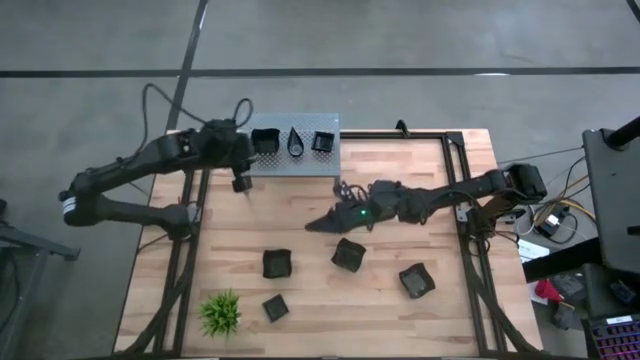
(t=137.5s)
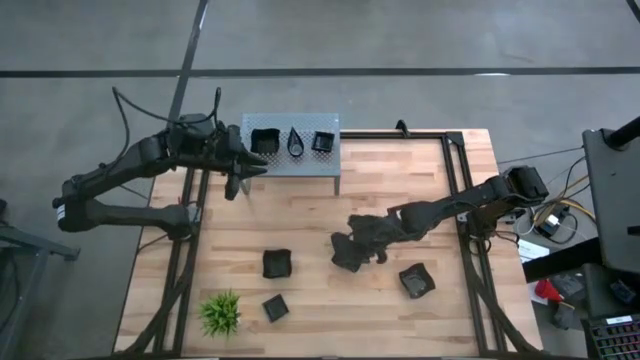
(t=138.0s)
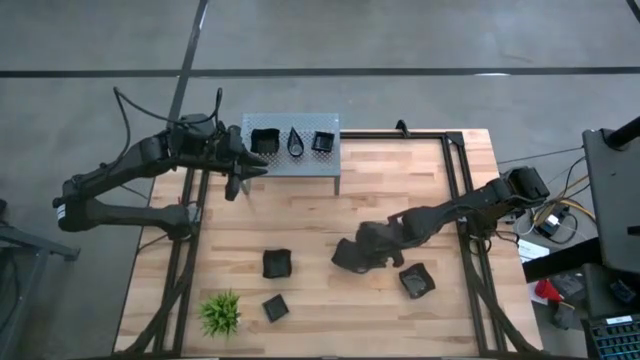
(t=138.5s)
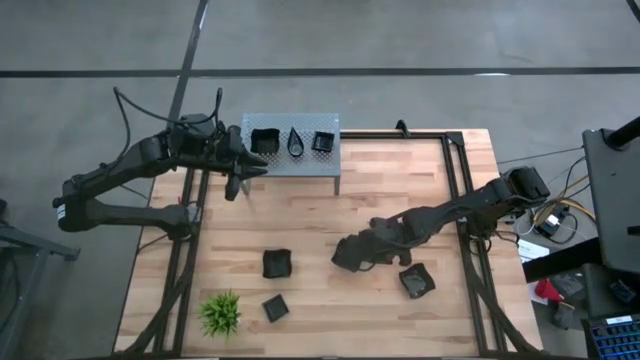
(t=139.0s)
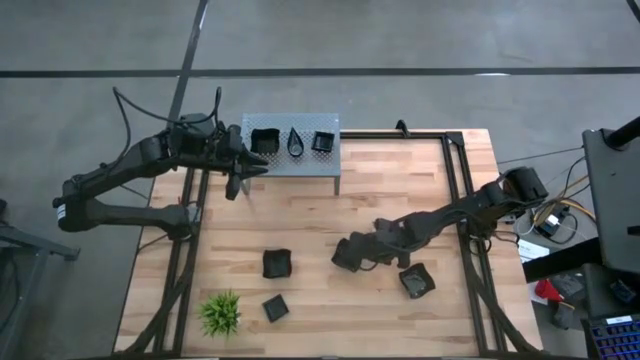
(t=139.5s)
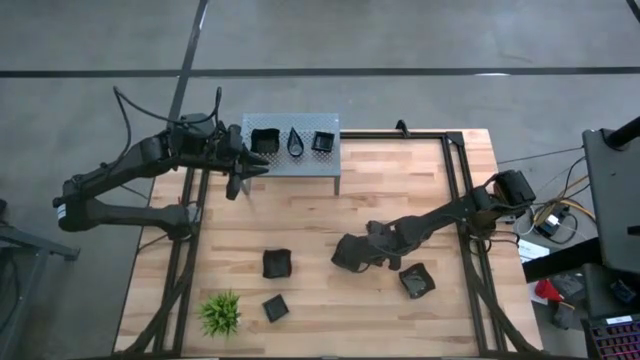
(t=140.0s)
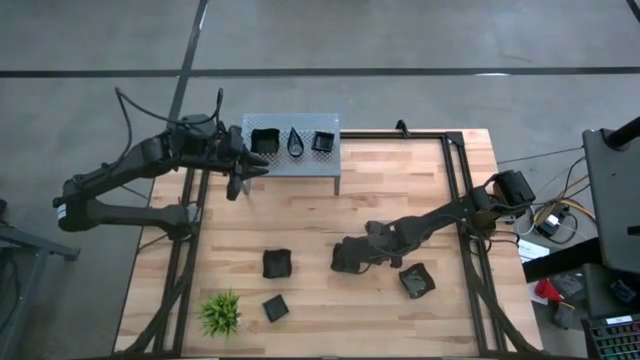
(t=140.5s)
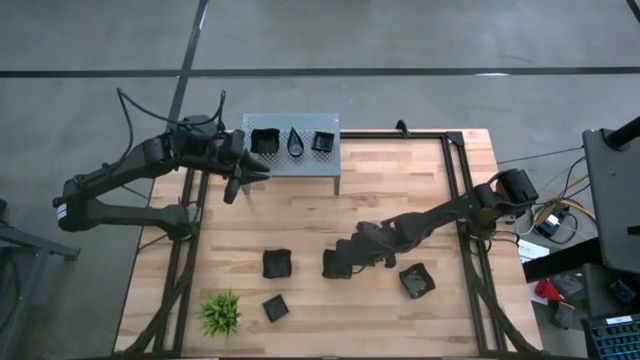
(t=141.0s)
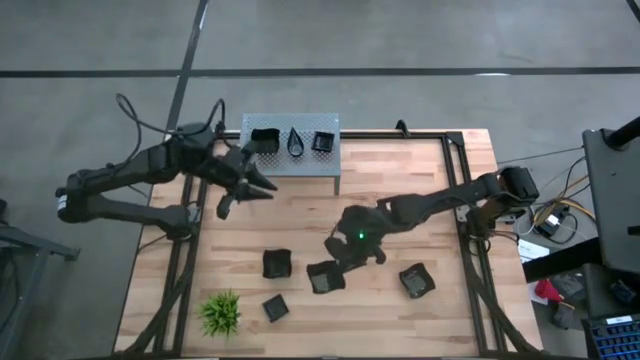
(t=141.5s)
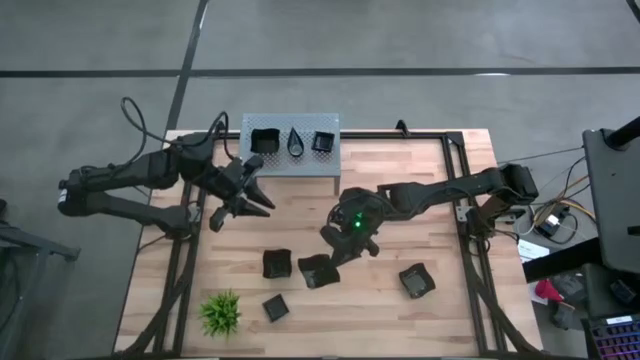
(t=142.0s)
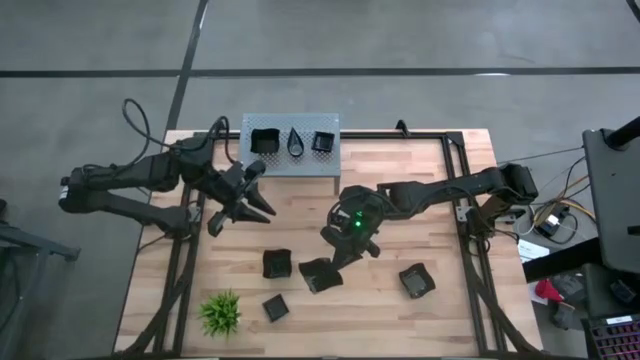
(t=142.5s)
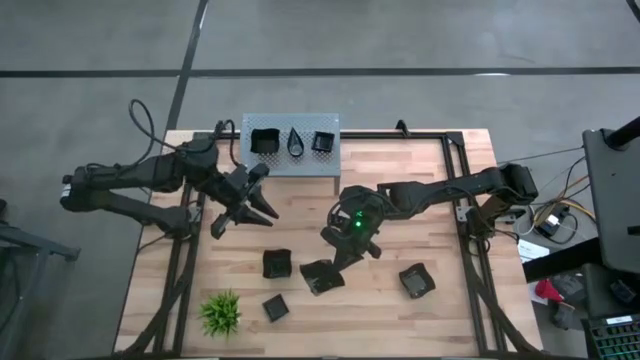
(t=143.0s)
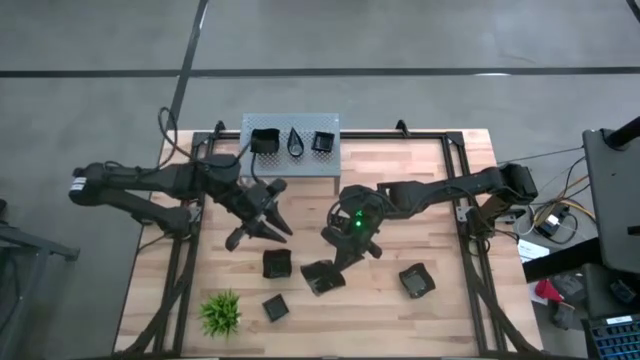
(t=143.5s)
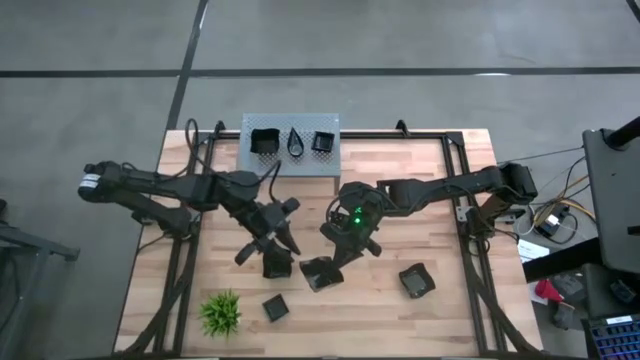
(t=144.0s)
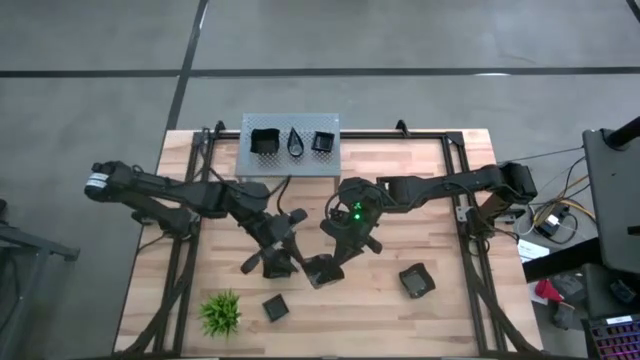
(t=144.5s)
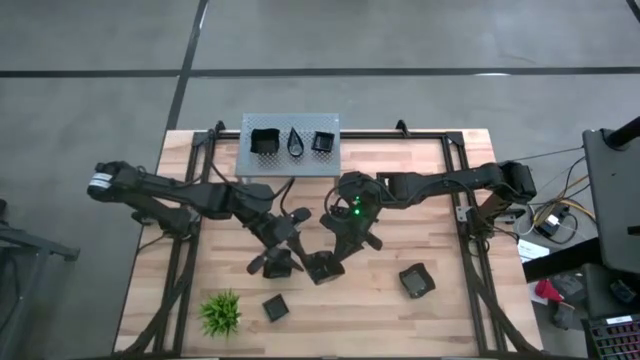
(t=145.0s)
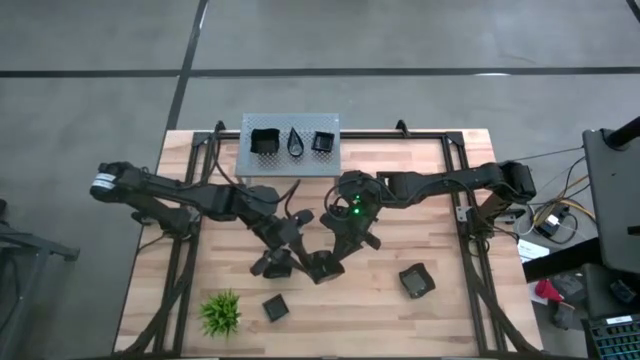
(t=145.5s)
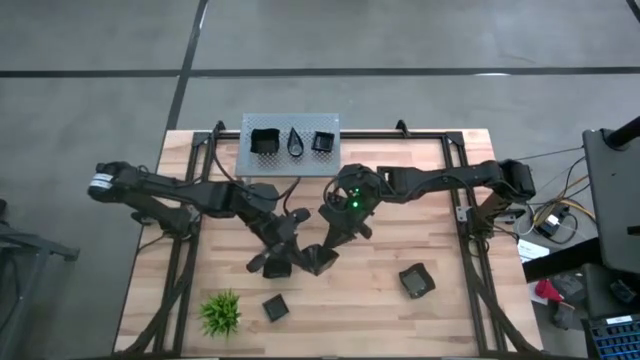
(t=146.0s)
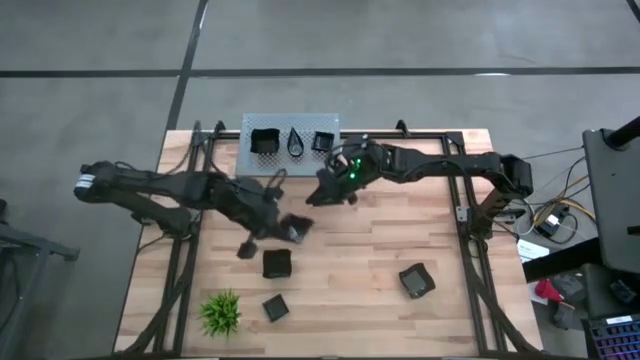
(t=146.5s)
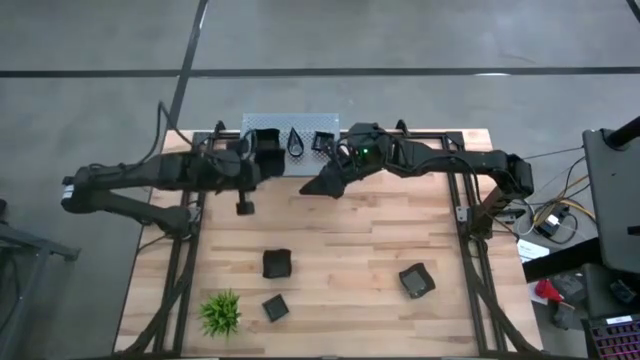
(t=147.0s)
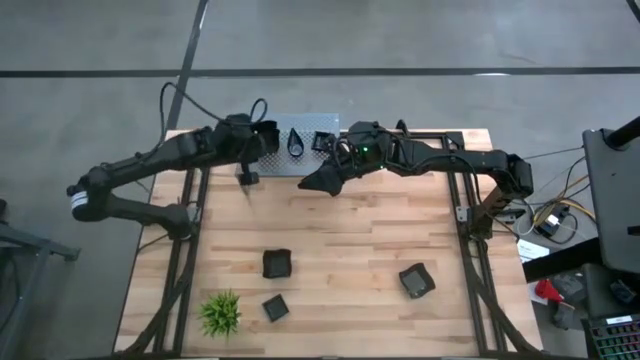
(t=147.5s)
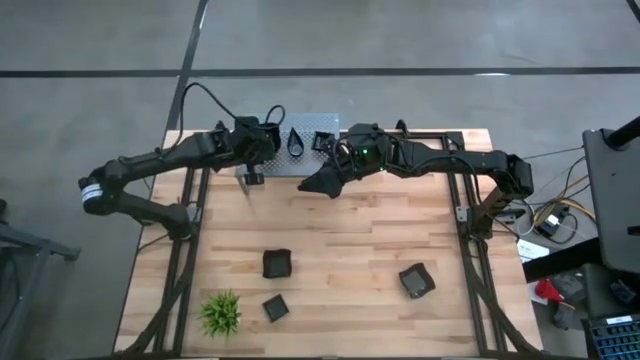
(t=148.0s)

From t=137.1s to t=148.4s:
Task: Pick & Place Mini shaped plates
Stack the middle right distorted square plate on top of the other square plate on the shelf

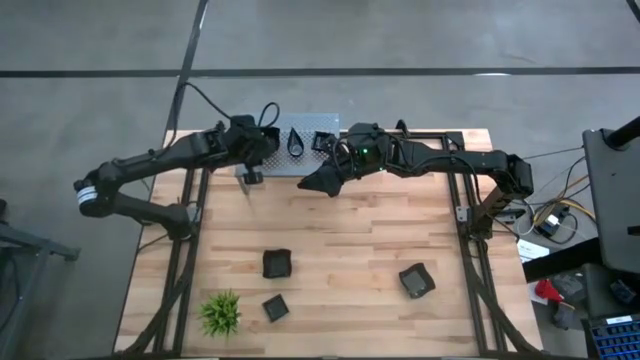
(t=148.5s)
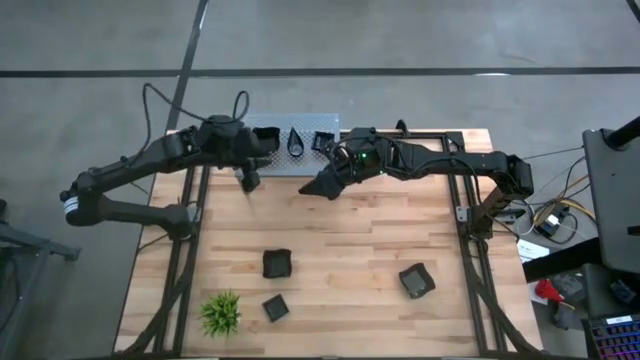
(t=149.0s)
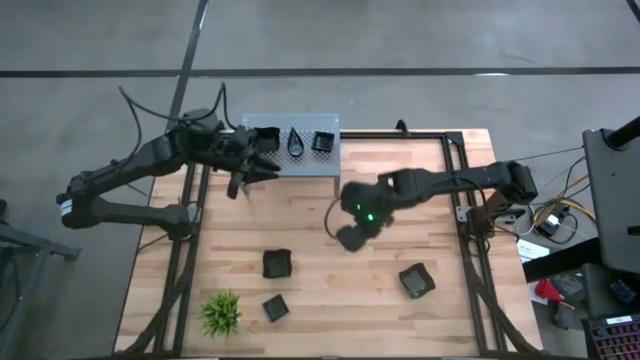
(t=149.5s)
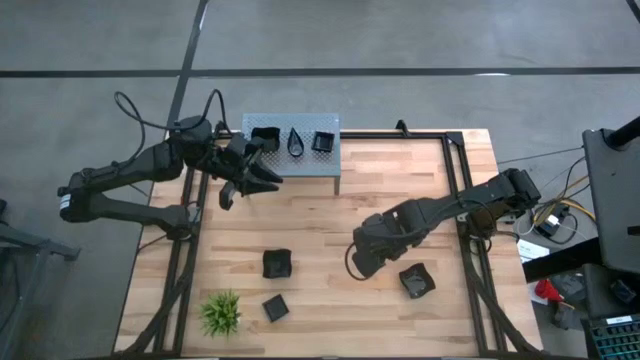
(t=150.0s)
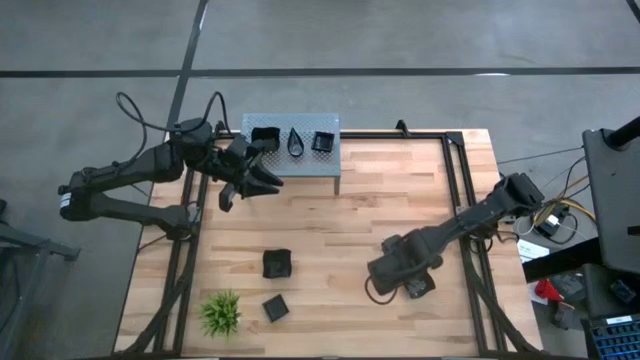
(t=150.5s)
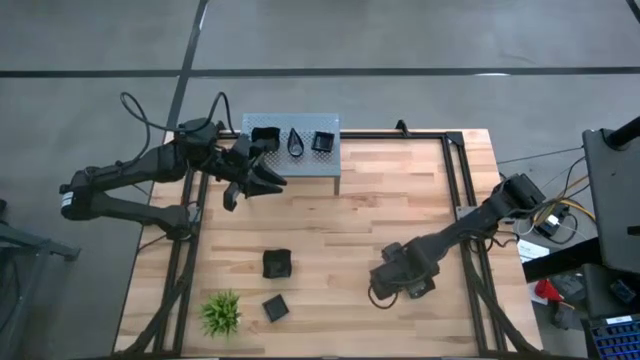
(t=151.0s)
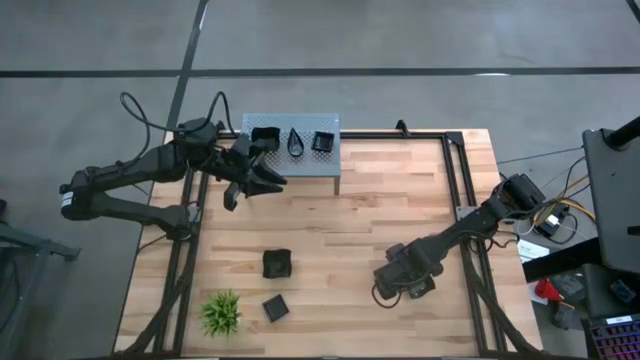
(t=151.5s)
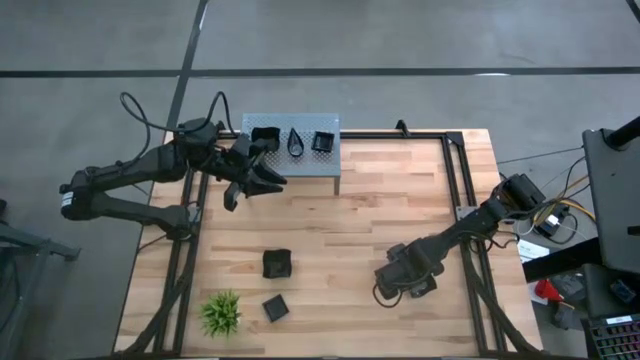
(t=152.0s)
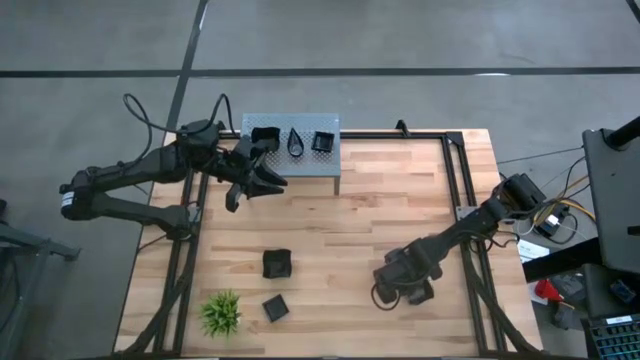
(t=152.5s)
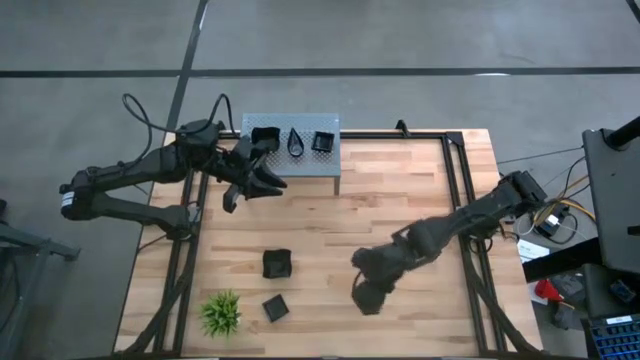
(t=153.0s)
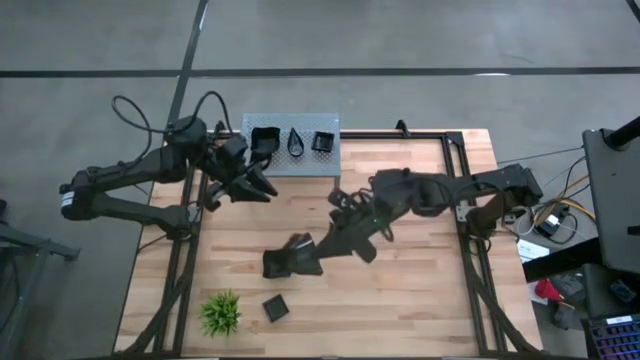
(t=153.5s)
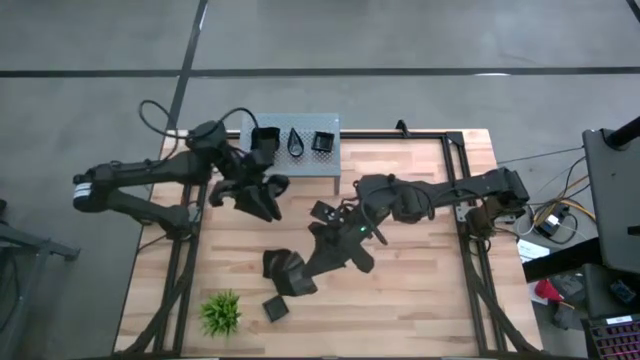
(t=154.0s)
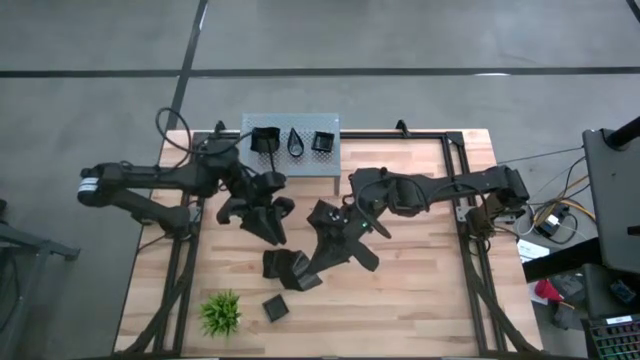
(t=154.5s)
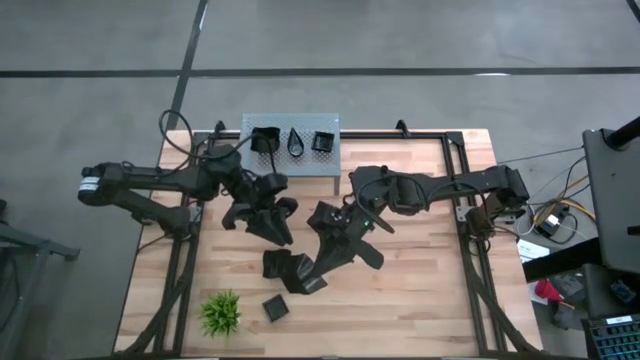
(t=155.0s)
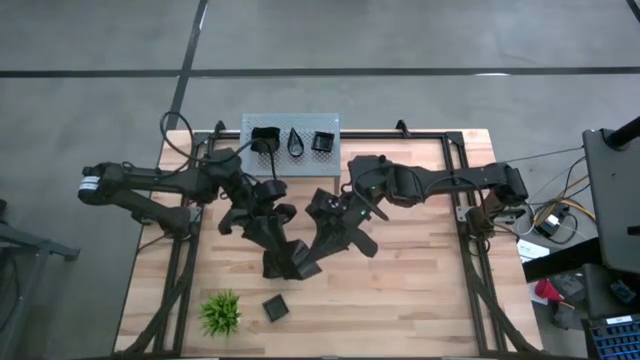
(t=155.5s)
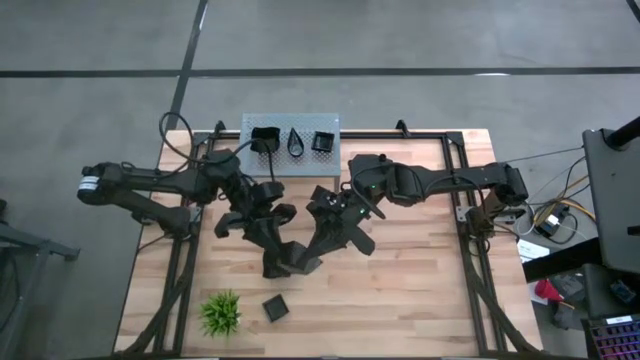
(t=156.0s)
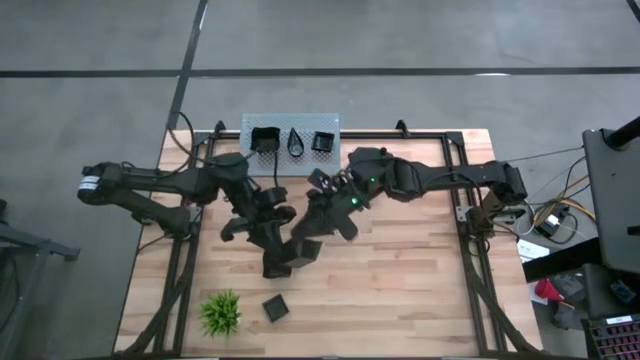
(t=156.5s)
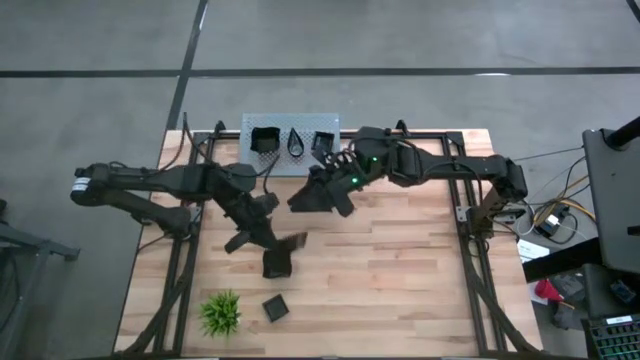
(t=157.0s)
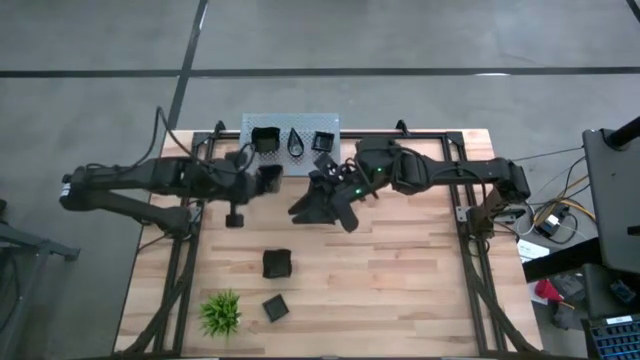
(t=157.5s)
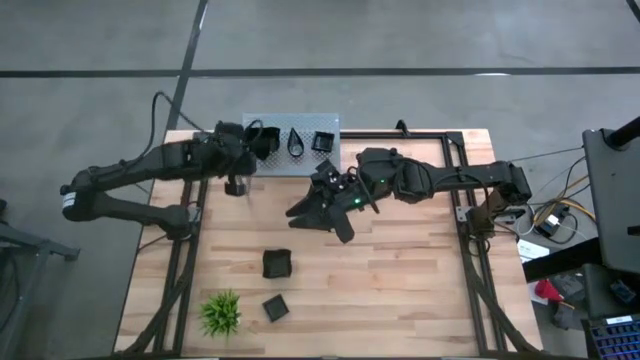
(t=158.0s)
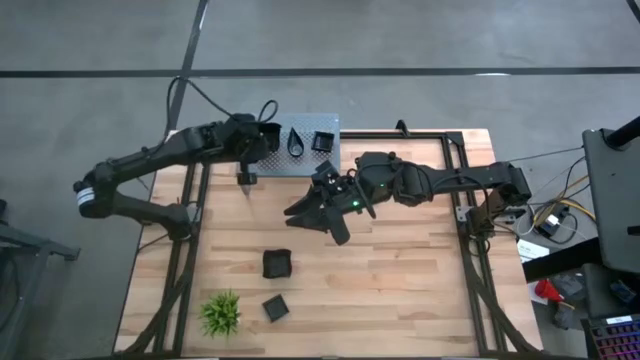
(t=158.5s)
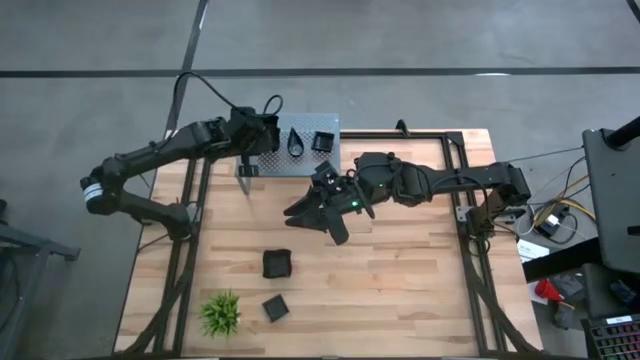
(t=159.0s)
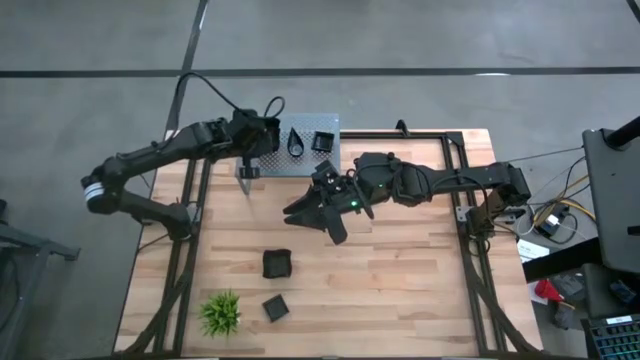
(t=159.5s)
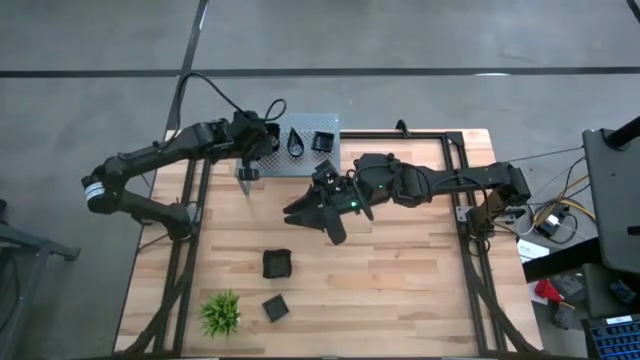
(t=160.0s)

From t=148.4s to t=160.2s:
Stack the rightmost distorted square plate on top of the other square plates on the shelf
